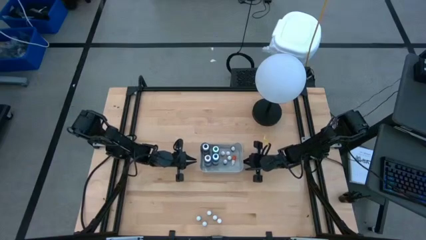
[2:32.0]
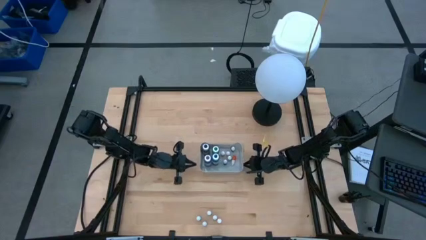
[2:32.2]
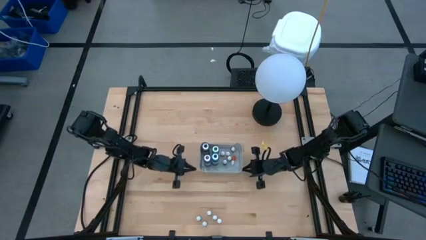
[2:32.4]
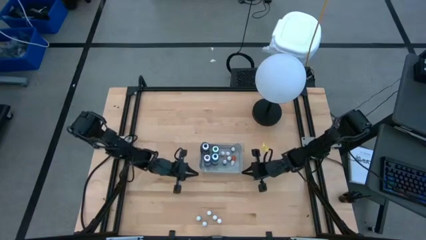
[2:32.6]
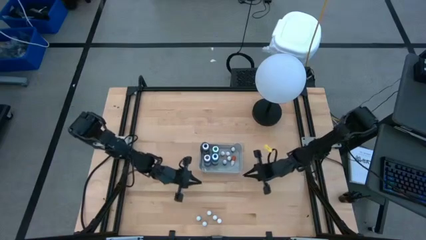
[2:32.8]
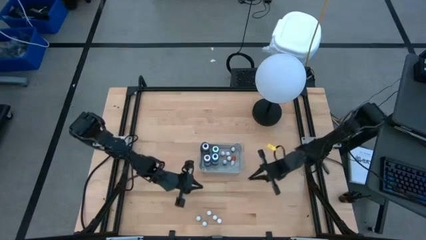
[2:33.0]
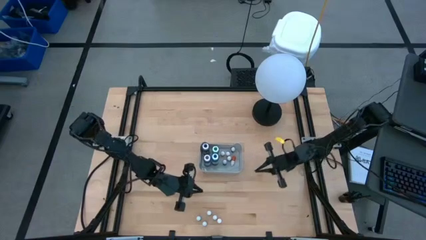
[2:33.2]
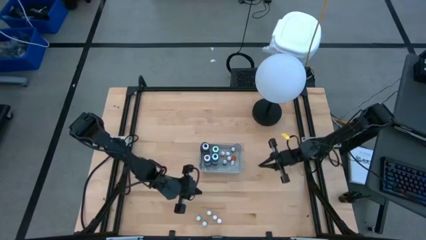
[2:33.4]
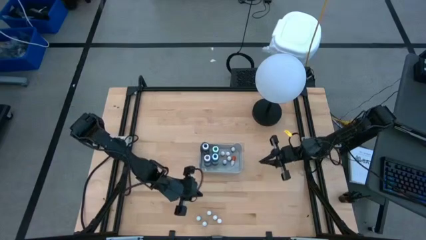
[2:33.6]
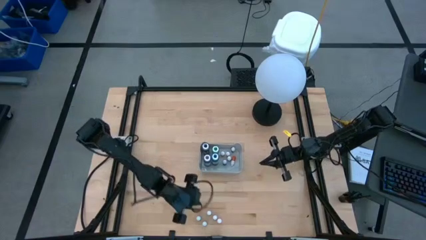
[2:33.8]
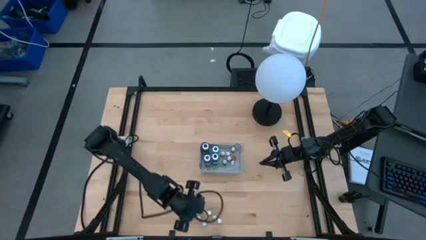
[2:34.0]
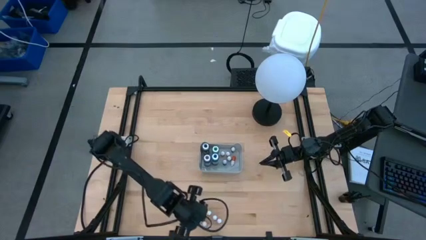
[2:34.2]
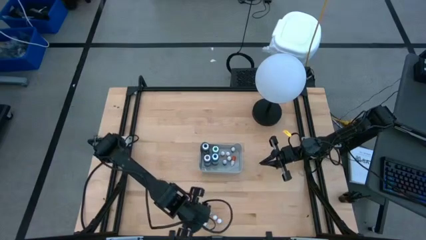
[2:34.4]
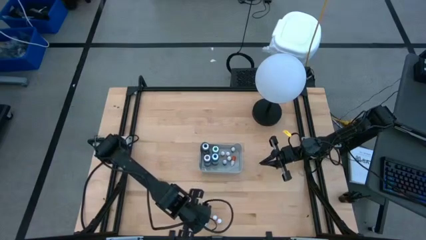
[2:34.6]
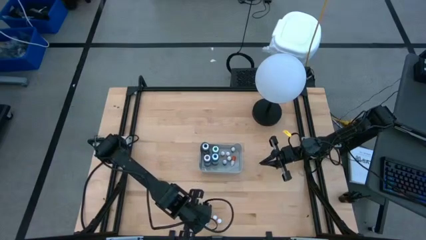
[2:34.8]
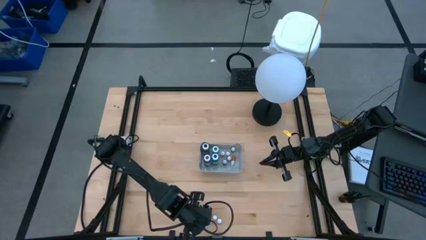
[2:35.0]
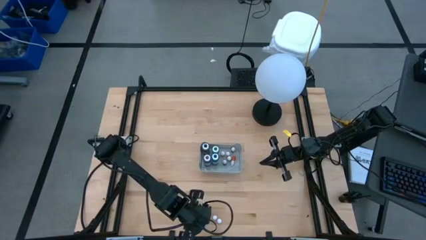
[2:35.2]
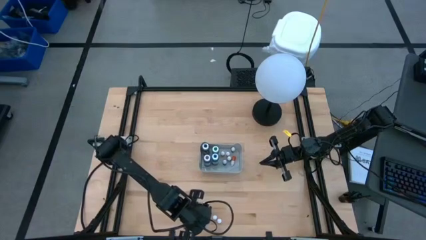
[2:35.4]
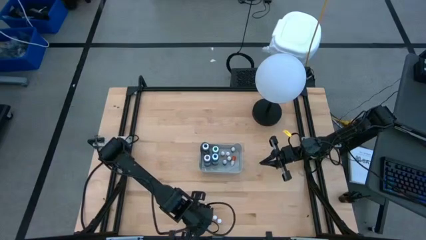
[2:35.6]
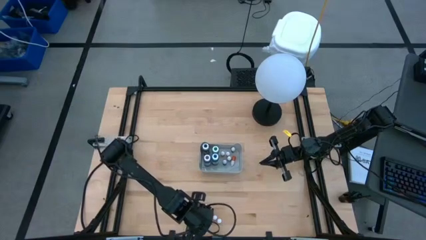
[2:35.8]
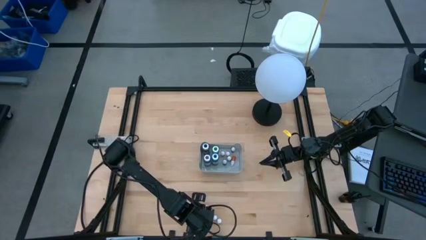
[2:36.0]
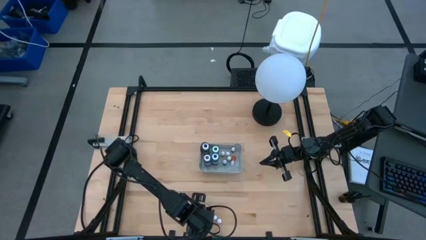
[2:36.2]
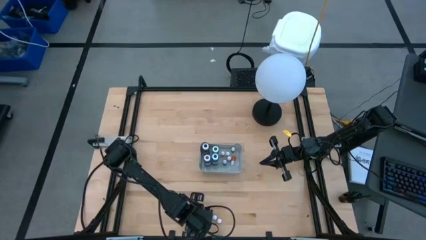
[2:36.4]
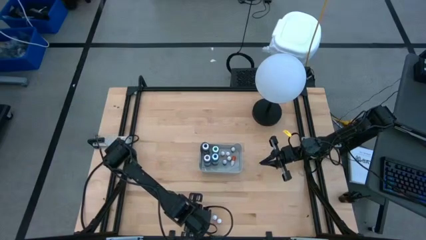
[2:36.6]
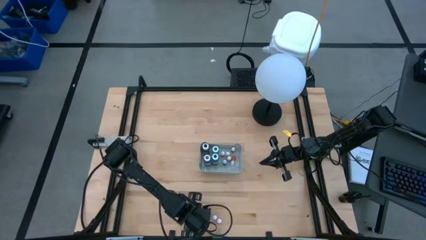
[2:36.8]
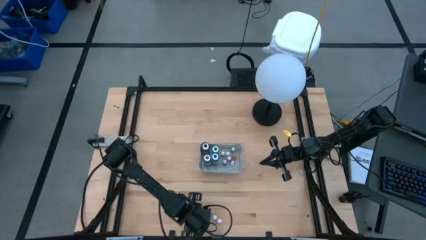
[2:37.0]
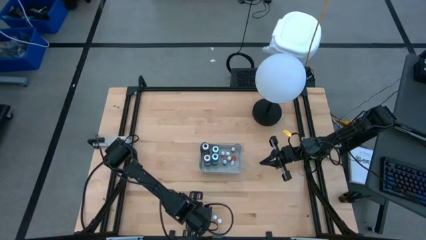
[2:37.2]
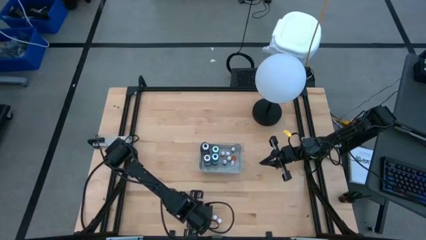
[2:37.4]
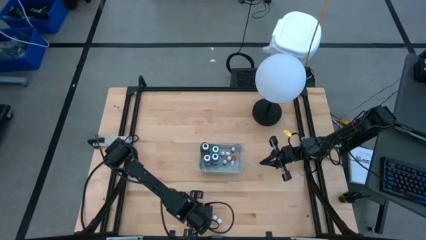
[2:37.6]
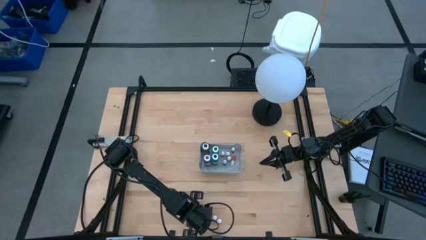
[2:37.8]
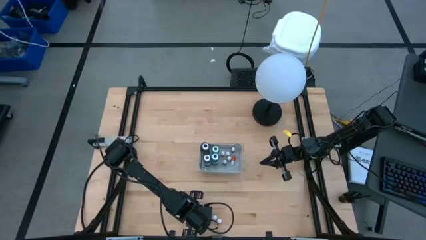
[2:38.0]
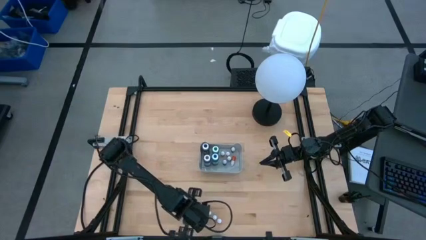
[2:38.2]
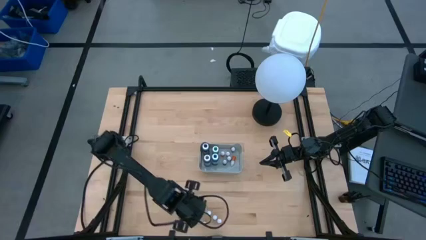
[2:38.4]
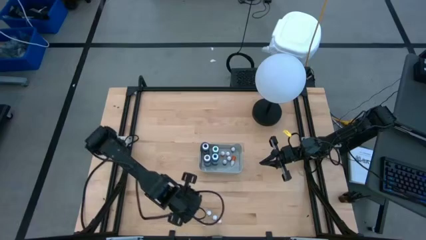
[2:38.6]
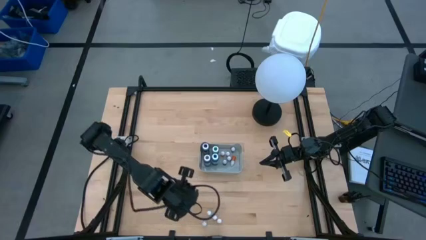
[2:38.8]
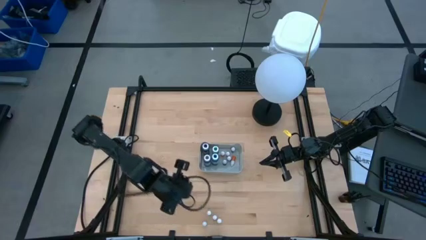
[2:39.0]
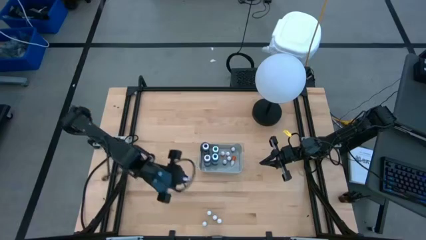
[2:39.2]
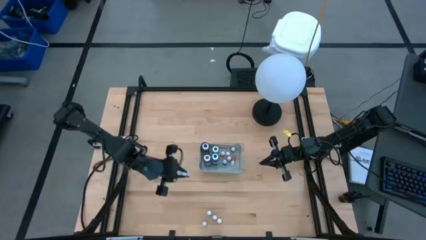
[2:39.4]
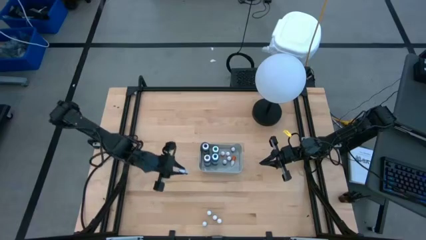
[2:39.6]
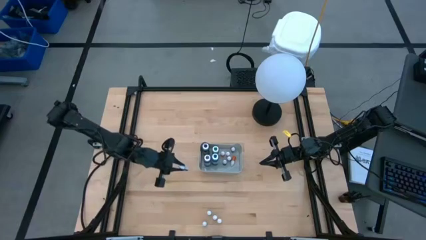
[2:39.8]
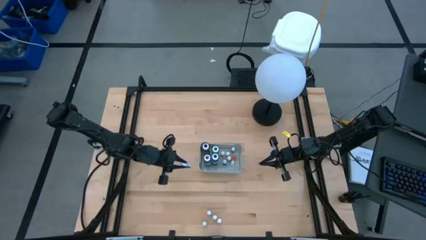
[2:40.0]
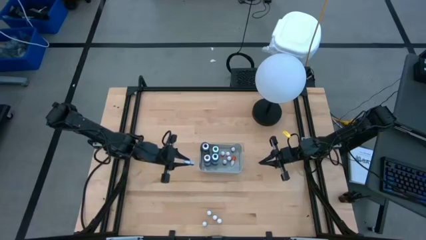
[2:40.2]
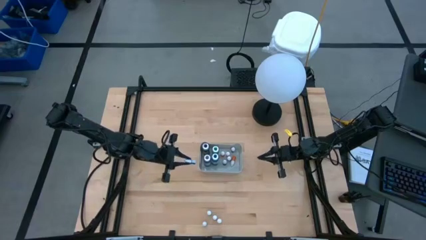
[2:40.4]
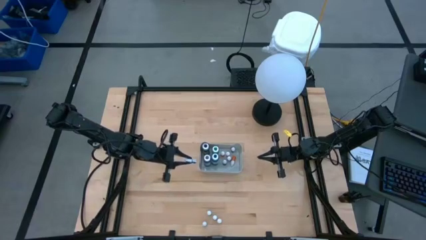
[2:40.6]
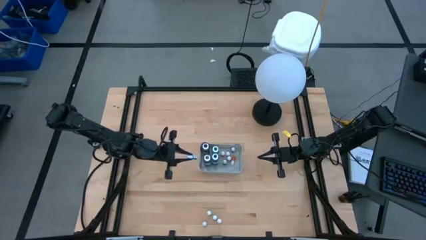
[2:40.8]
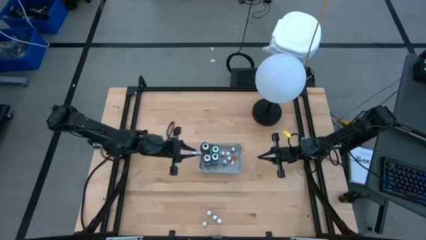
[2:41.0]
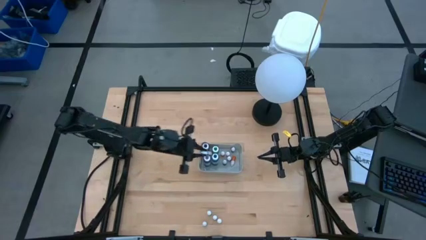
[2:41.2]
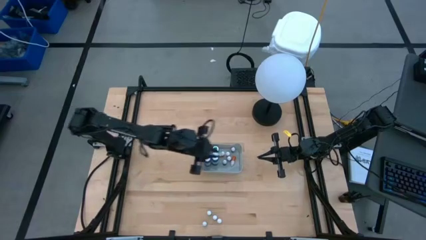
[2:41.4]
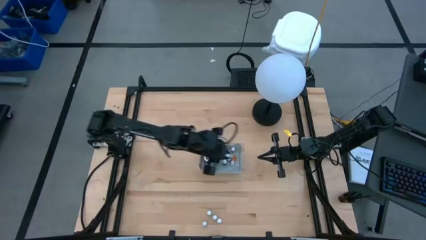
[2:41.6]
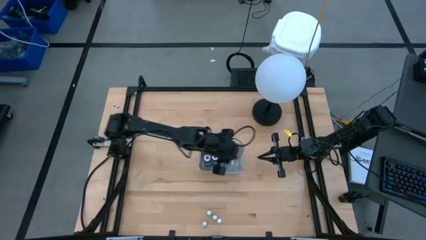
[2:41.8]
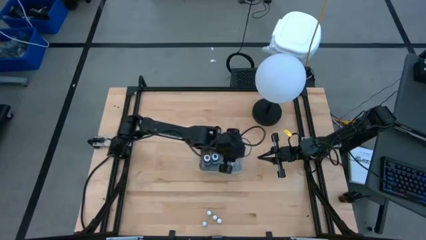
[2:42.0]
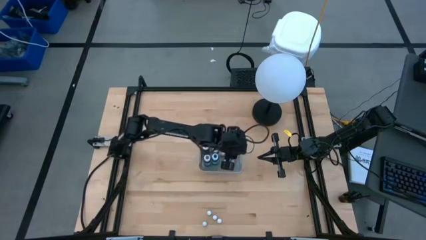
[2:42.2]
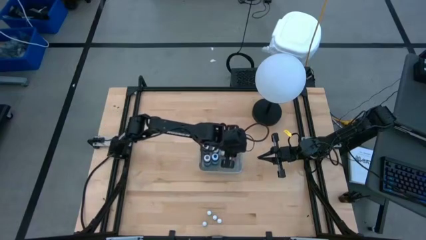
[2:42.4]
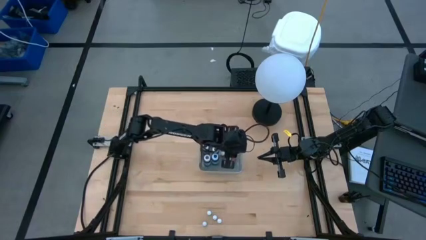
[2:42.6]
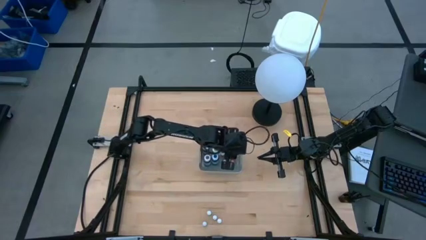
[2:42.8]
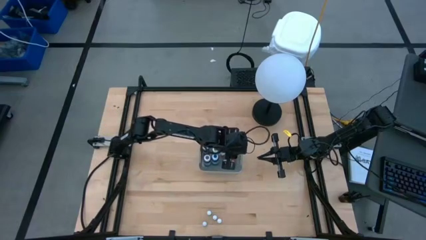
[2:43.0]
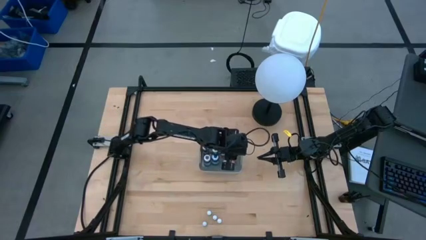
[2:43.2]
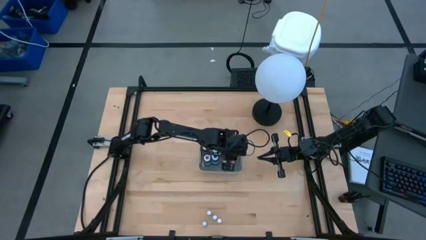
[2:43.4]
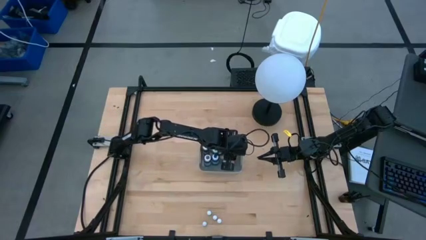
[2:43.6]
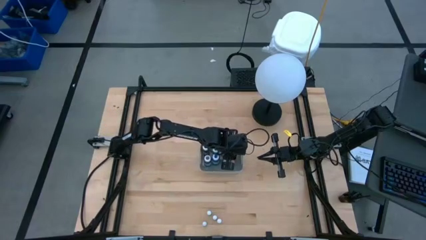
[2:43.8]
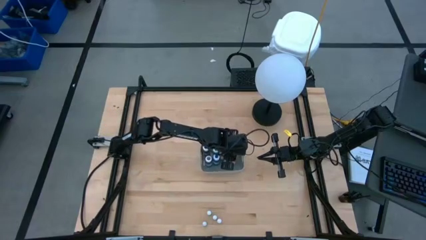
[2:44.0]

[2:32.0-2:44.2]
Task: Pick & Place food coloring
Put the small blue food coloring bottle into the gray bin

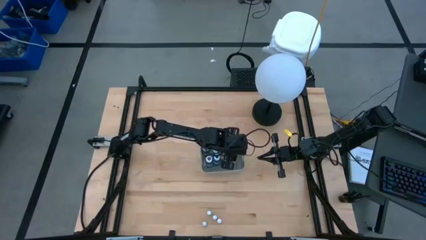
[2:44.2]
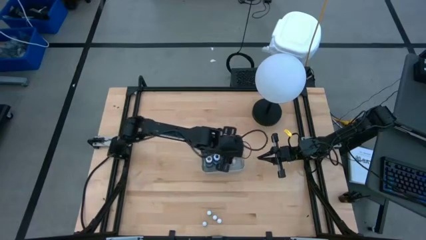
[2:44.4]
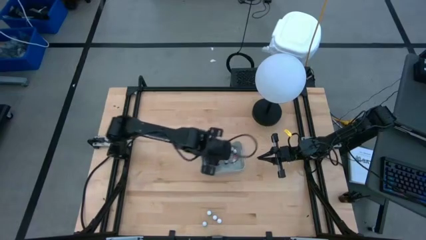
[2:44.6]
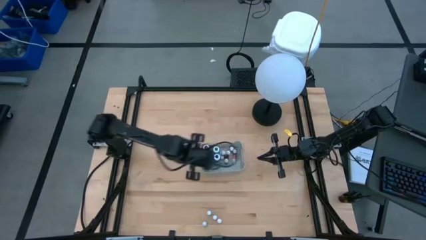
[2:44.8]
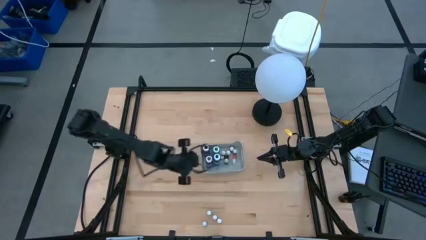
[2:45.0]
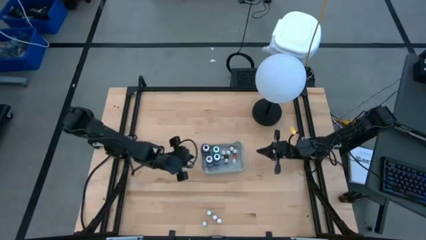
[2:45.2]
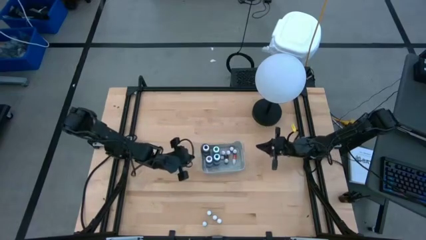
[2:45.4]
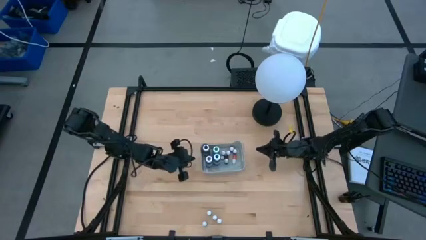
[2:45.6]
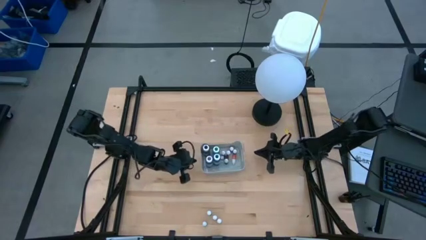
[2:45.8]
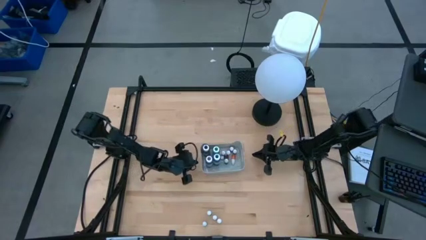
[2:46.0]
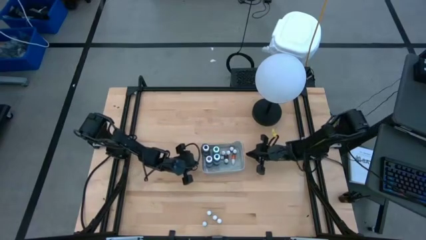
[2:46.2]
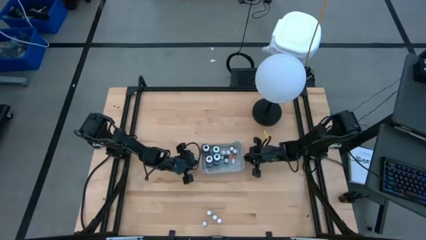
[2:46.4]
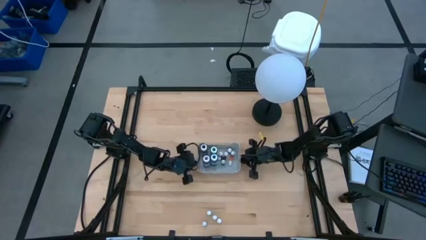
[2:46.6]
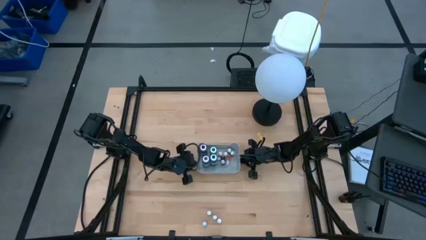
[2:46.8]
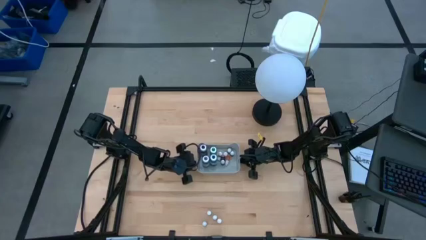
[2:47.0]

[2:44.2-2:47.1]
Adjust the gray bin to the center of the table
